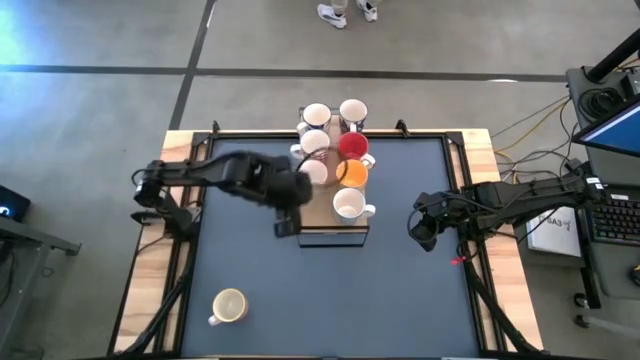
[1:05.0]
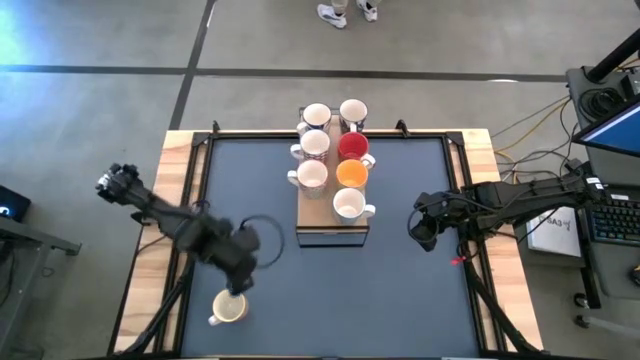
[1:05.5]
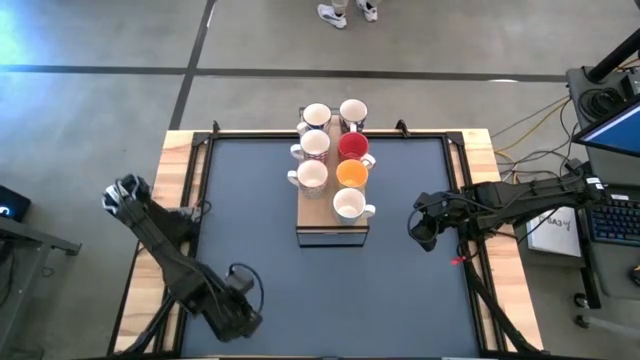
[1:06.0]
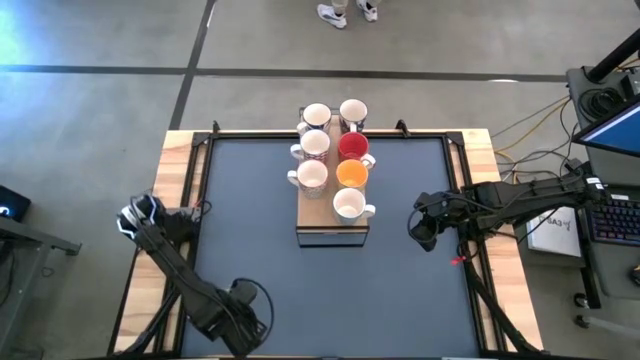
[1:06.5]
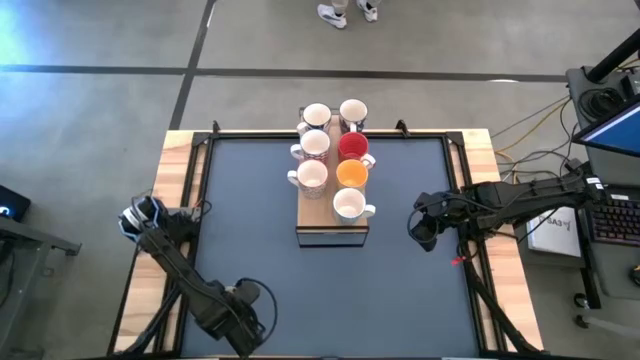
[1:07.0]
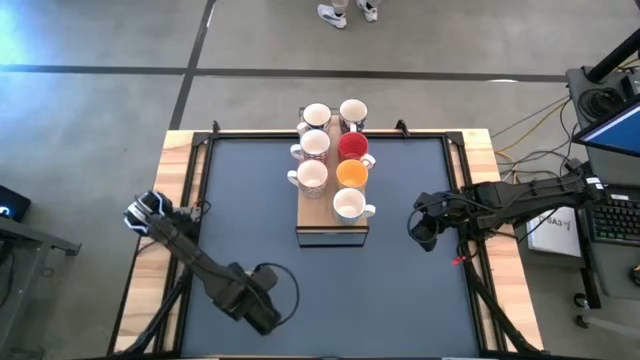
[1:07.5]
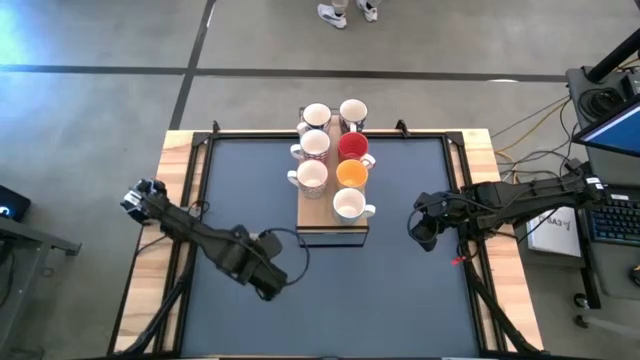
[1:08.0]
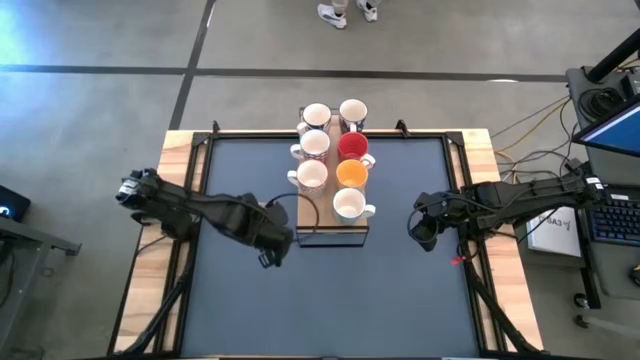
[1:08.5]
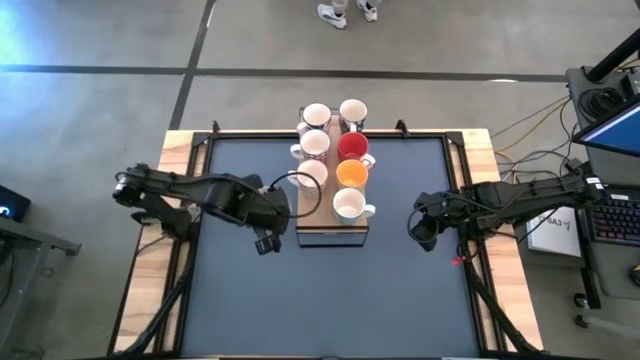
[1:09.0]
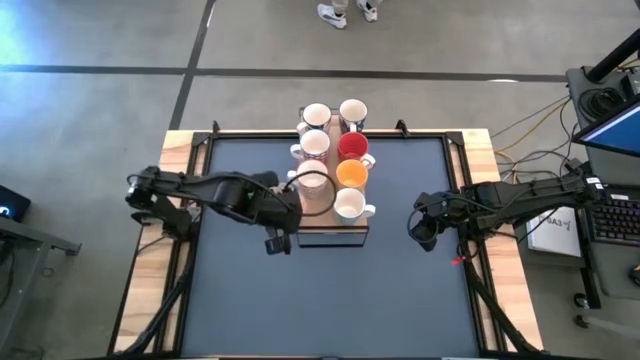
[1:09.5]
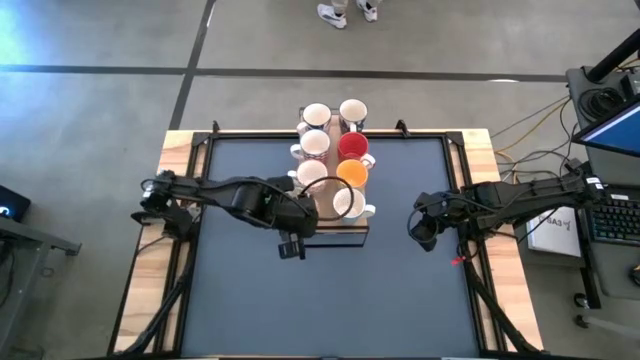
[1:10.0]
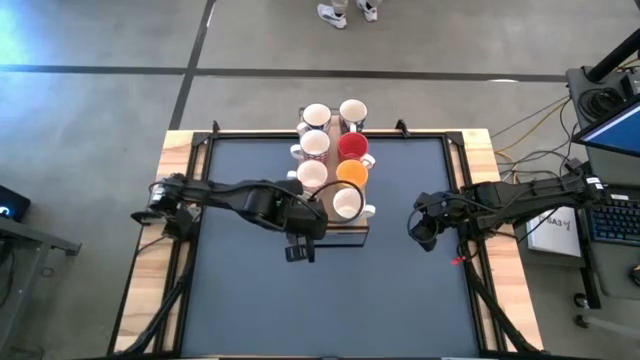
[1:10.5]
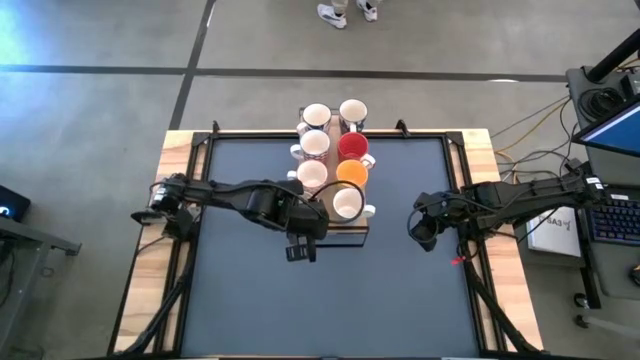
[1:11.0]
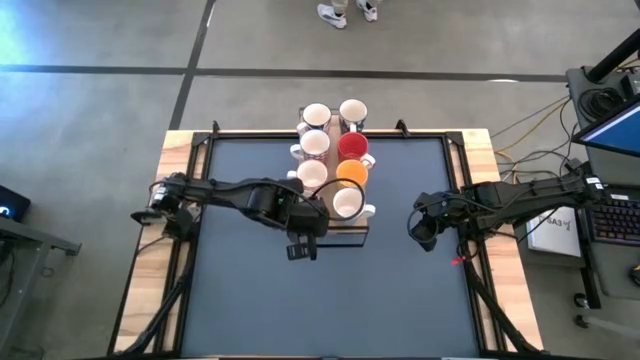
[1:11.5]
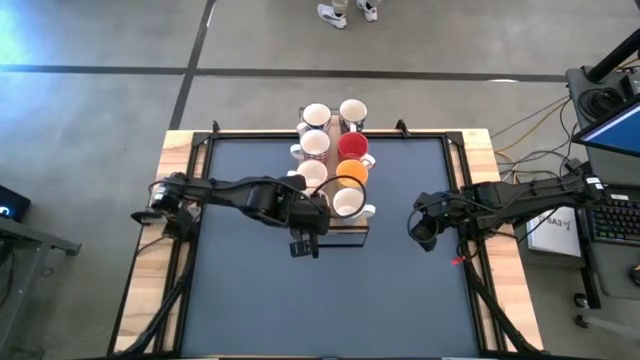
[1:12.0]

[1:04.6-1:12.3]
Task: Place coffee mugs
Put the orange patterned mug on the shelf

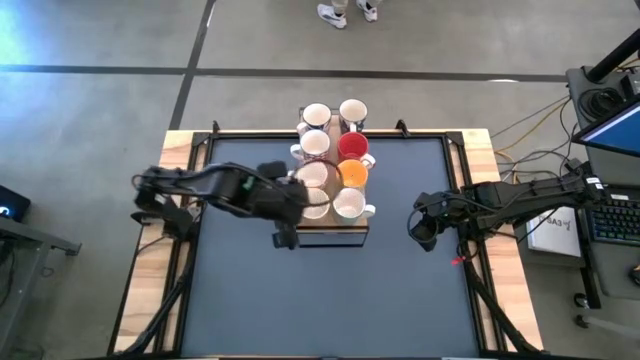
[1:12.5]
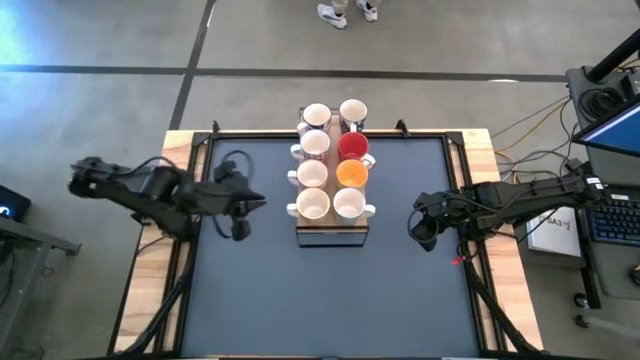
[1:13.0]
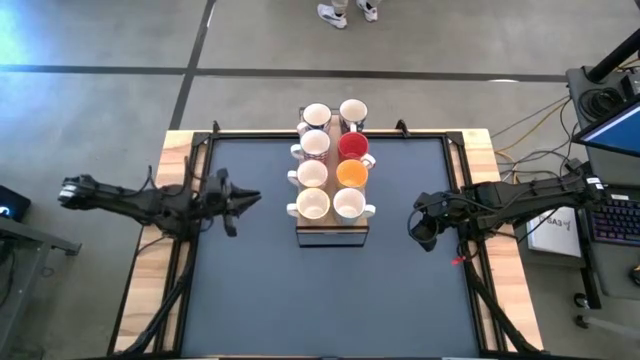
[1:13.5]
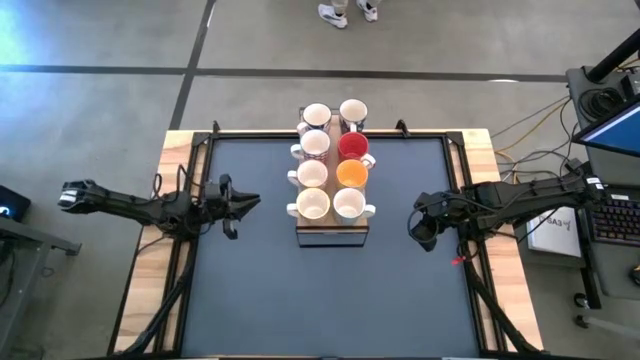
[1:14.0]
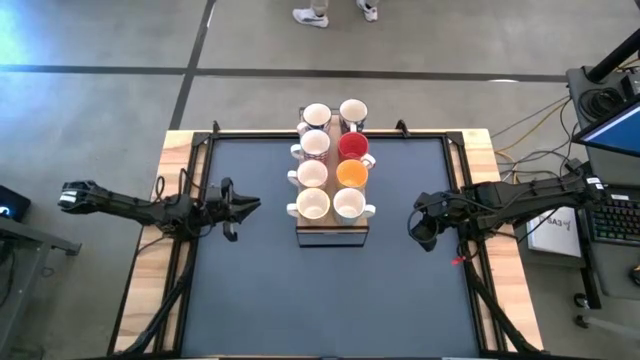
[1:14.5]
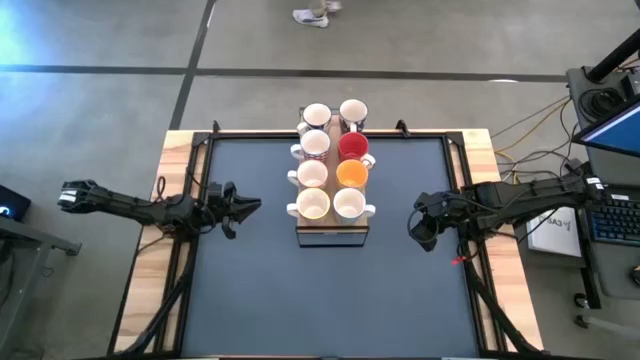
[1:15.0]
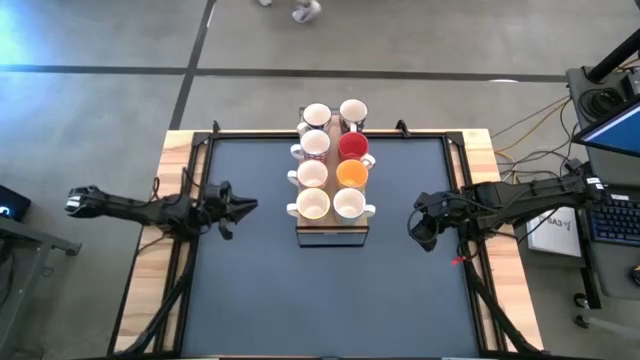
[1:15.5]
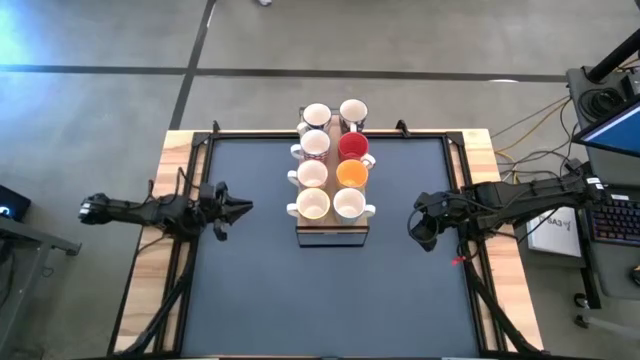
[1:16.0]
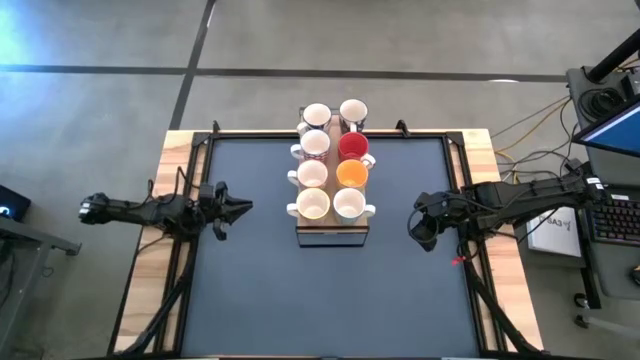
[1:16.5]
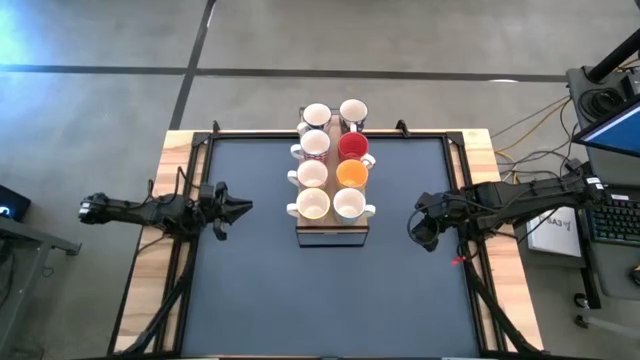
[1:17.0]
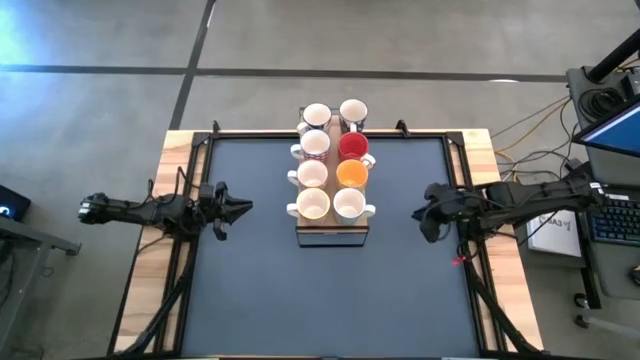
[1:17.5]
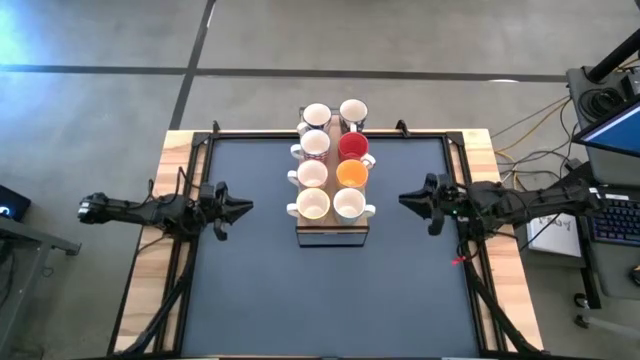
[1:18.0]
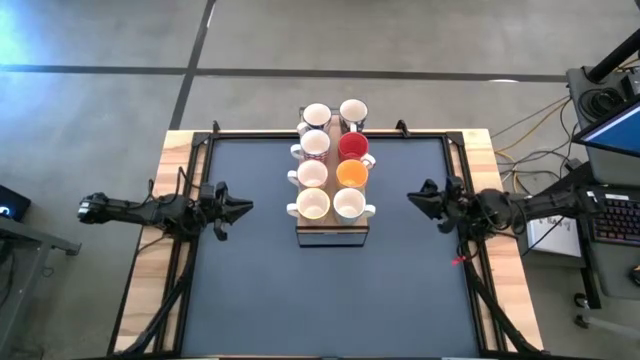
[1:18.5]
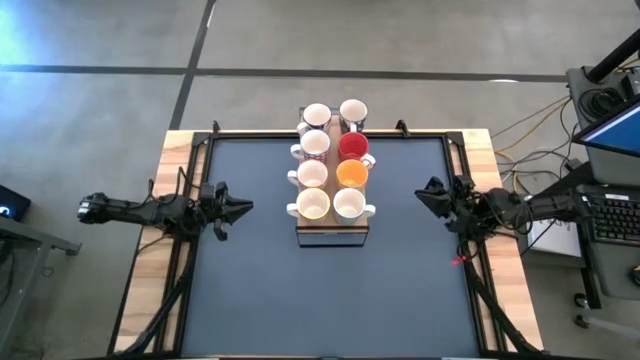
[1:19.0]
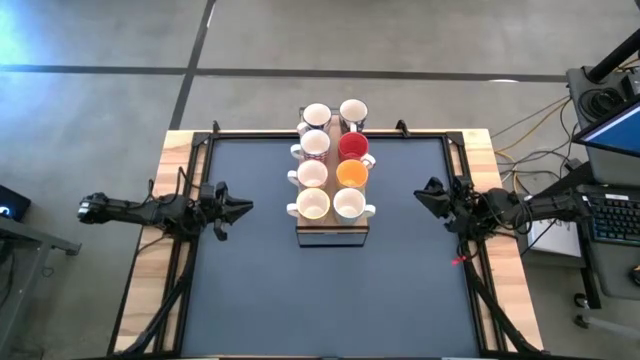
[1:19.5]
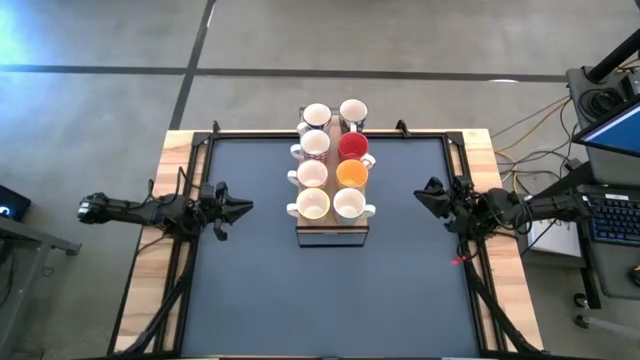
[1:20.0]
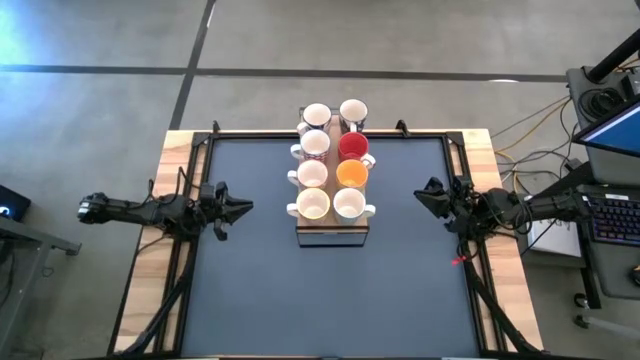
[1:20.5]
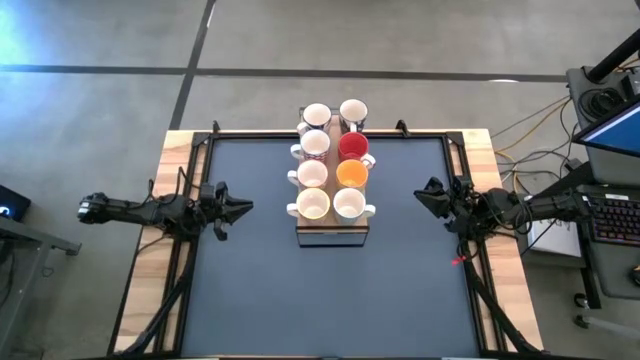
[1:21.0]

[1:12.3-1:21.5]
Return to Home Position

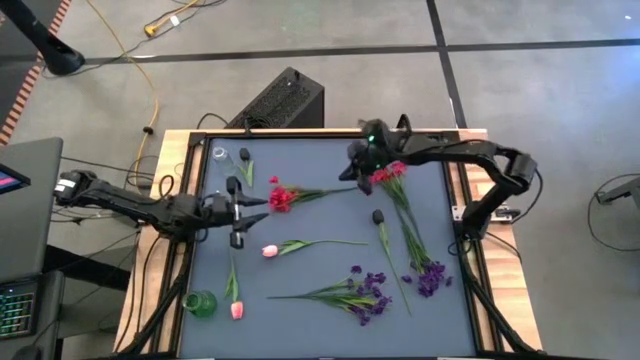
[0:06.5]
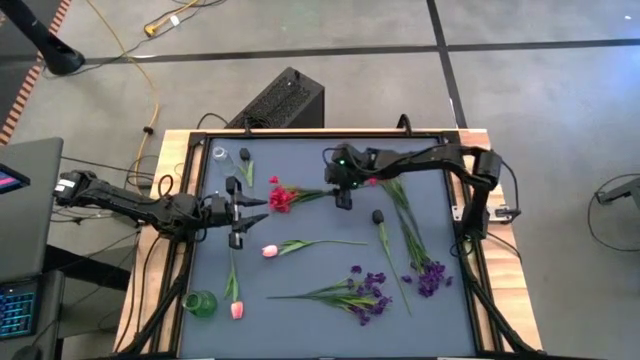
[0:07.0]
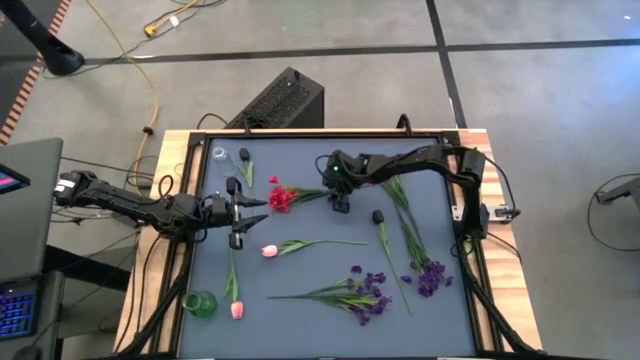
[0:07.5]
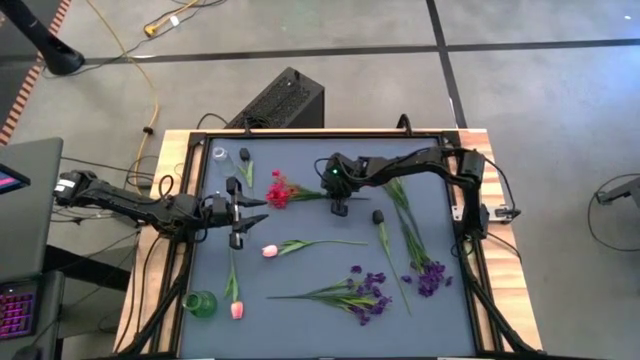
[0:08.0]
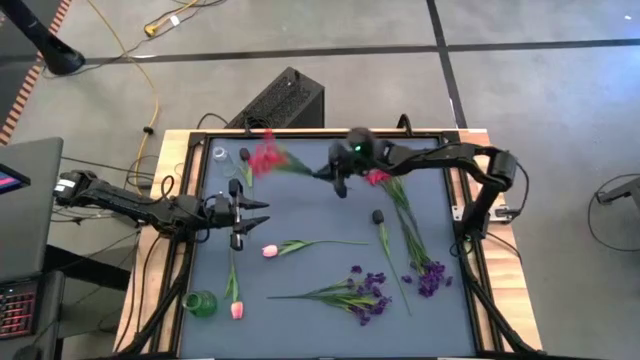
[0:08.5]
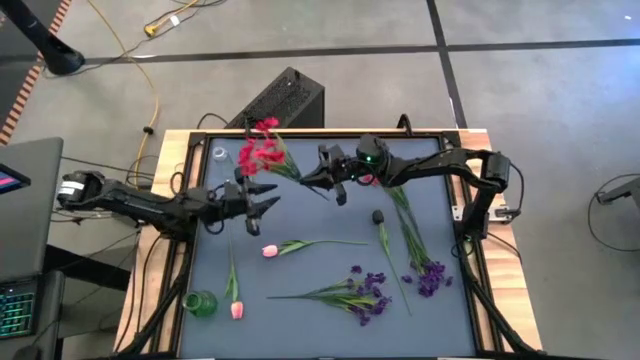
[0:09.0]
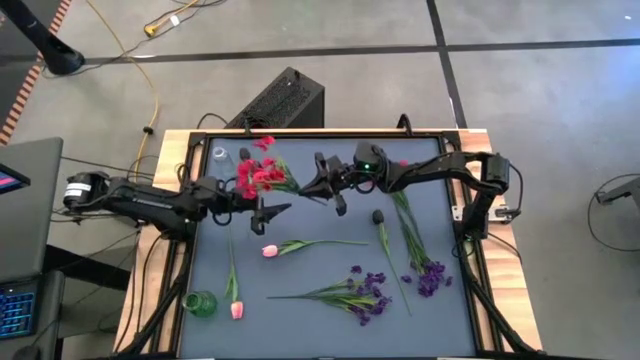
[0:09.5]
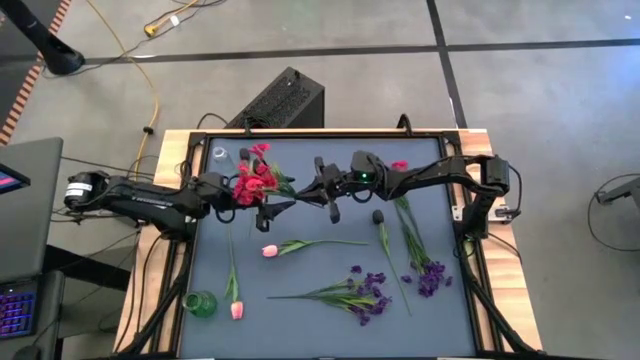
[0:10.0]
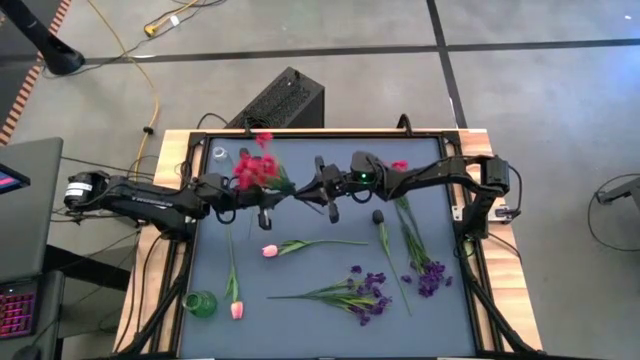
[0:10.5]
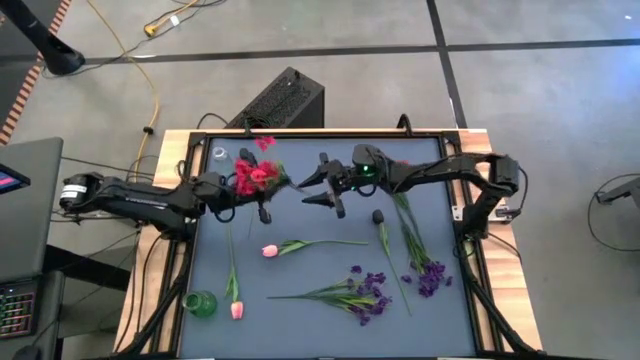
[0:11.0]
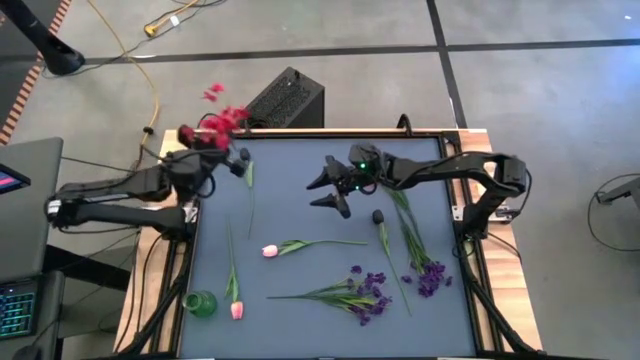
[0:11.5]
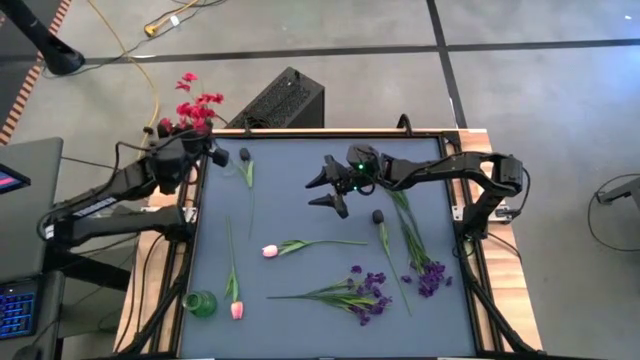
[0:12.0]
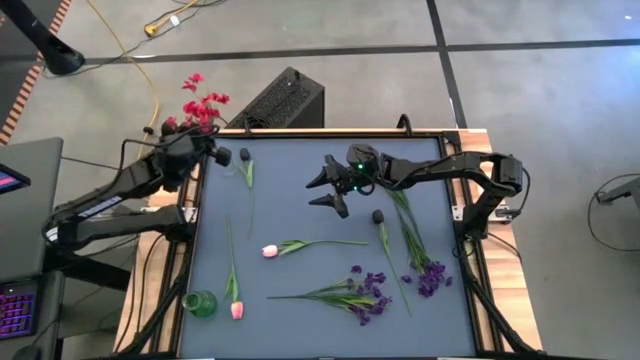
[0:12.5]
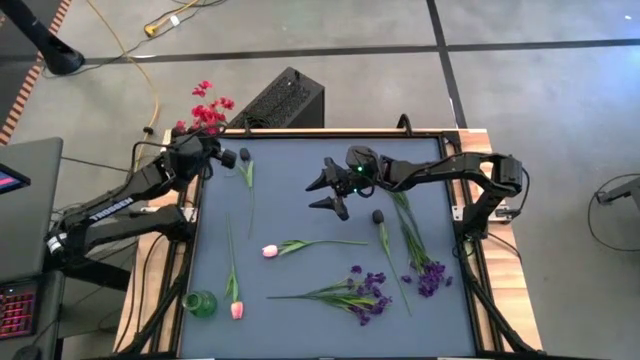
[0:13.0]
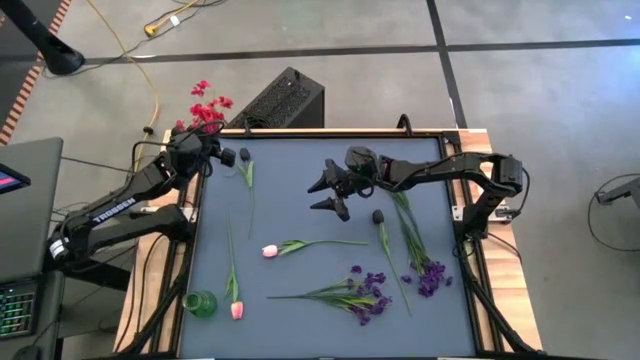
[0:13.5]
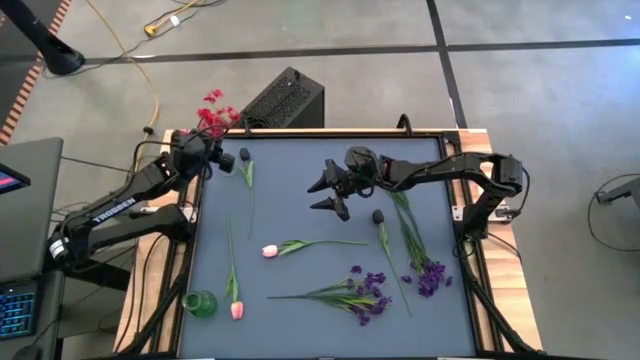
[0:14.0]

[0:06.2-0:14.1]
Task: Sort flowers into vase by color
Put the left red flowers into the transparent vase
